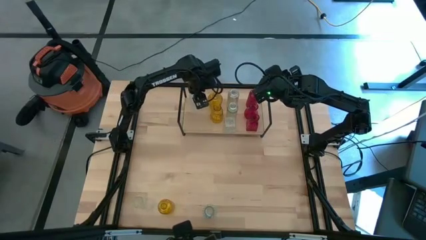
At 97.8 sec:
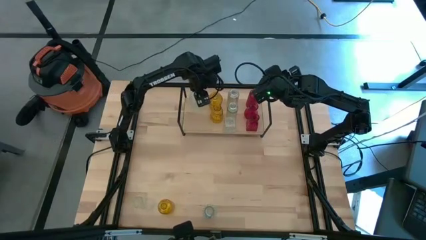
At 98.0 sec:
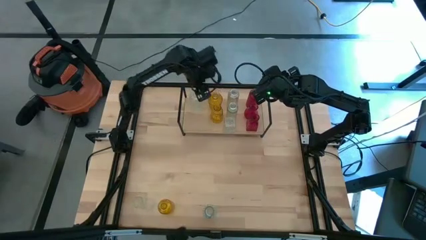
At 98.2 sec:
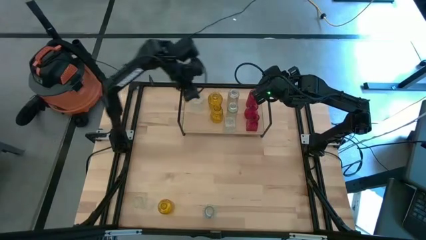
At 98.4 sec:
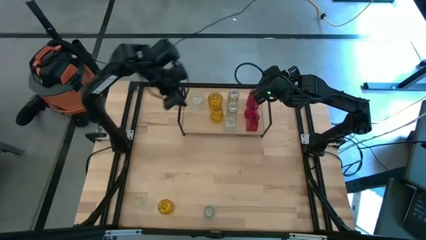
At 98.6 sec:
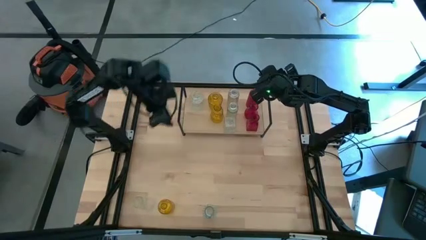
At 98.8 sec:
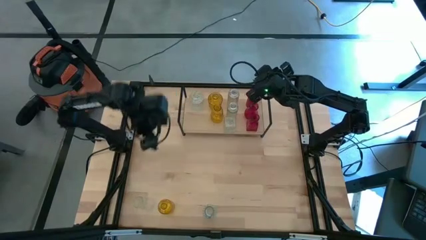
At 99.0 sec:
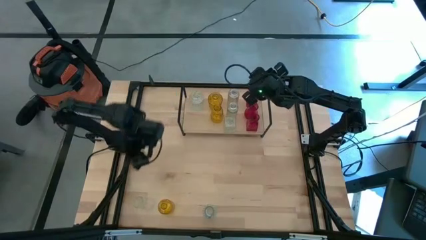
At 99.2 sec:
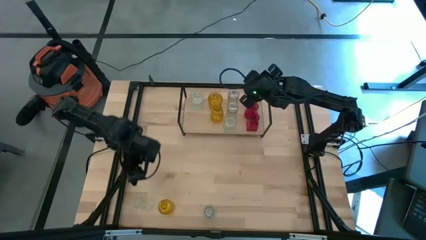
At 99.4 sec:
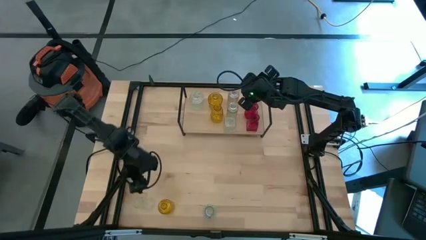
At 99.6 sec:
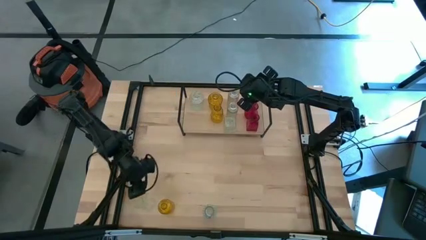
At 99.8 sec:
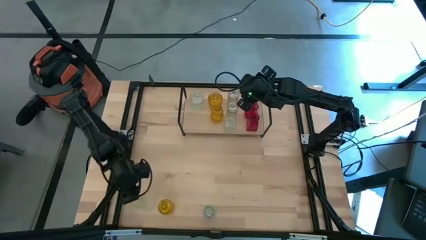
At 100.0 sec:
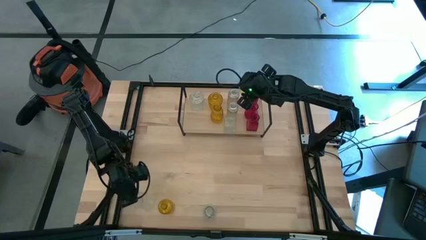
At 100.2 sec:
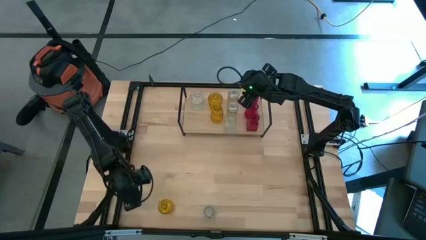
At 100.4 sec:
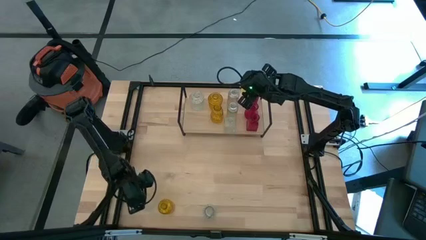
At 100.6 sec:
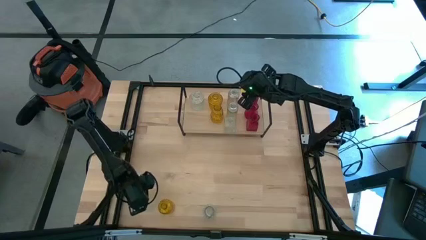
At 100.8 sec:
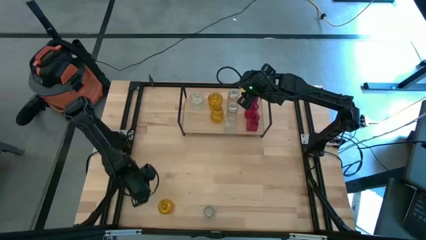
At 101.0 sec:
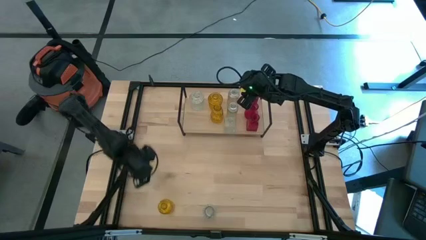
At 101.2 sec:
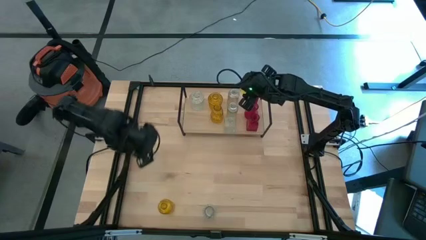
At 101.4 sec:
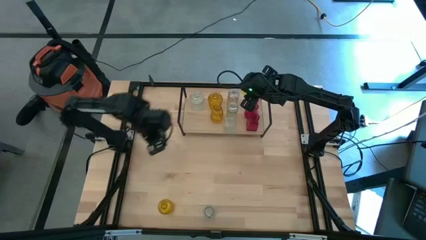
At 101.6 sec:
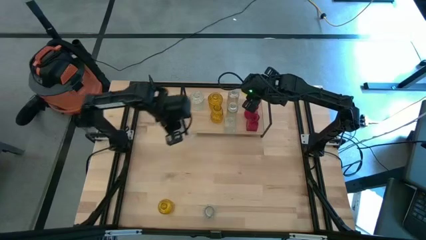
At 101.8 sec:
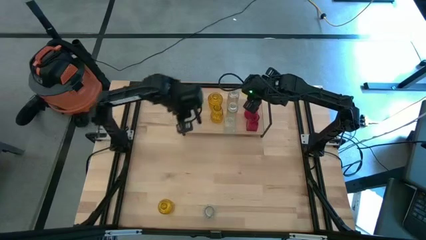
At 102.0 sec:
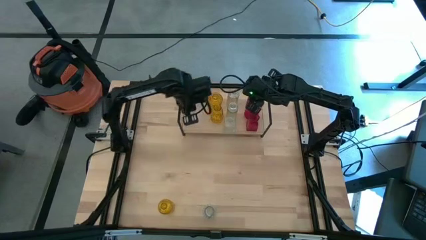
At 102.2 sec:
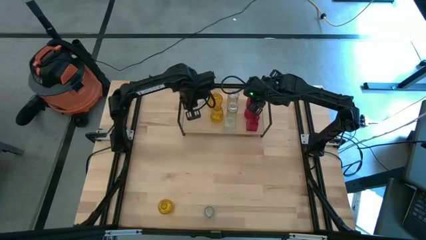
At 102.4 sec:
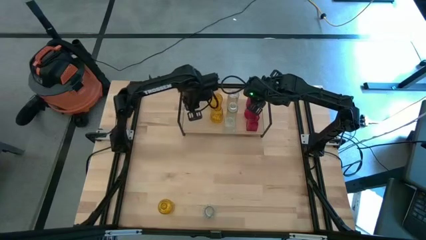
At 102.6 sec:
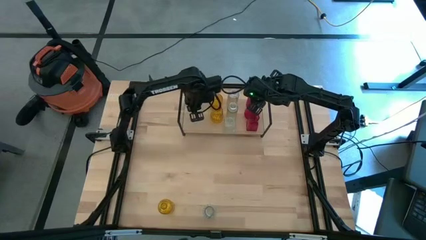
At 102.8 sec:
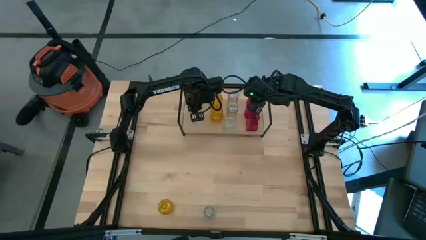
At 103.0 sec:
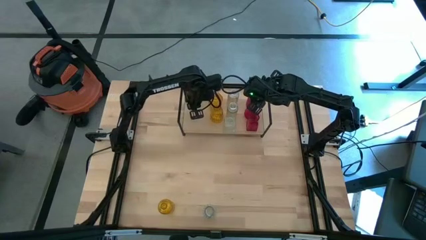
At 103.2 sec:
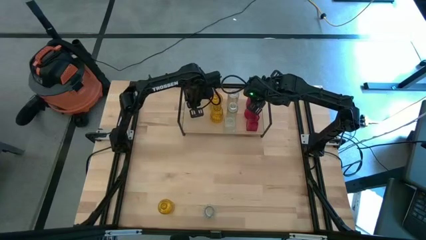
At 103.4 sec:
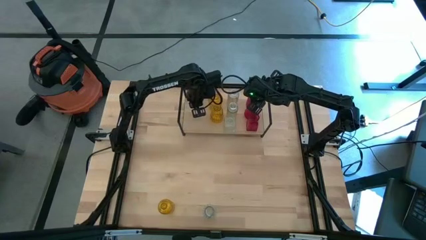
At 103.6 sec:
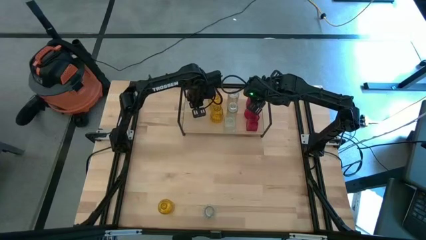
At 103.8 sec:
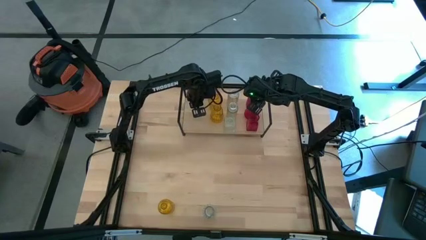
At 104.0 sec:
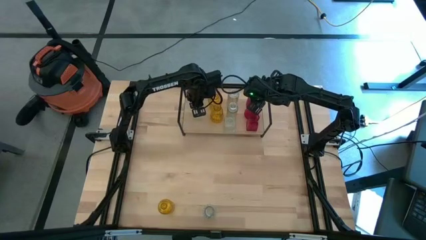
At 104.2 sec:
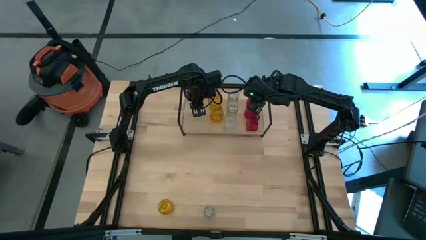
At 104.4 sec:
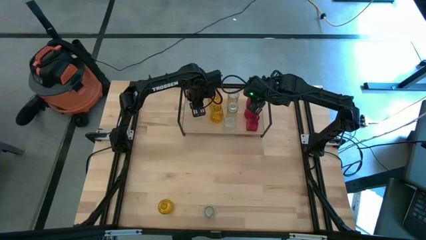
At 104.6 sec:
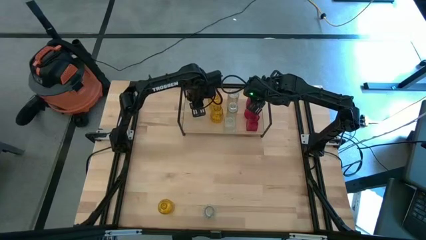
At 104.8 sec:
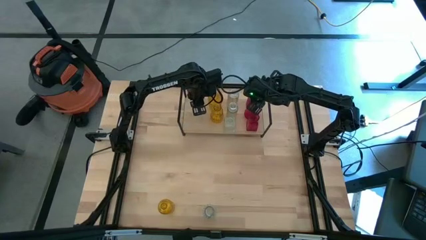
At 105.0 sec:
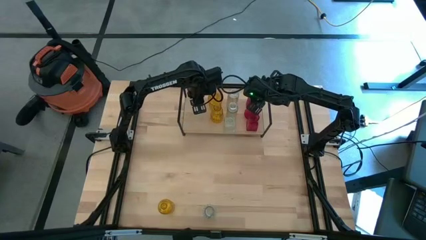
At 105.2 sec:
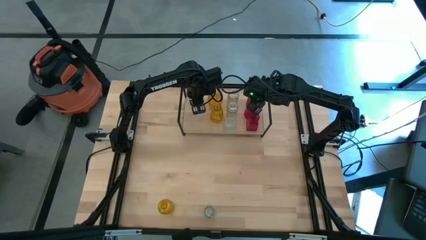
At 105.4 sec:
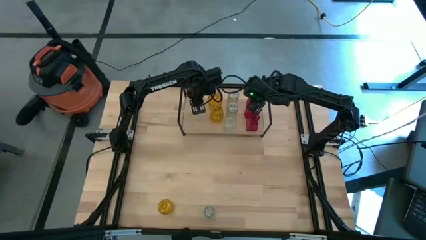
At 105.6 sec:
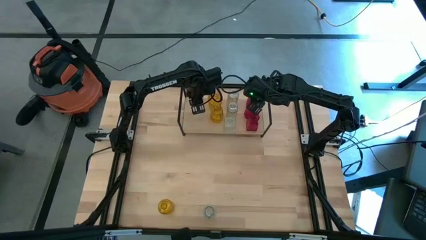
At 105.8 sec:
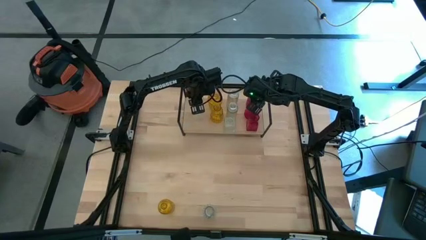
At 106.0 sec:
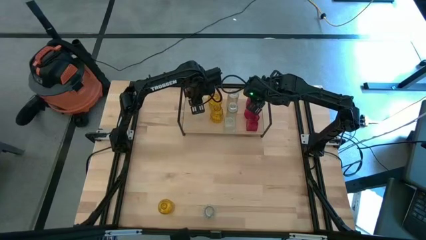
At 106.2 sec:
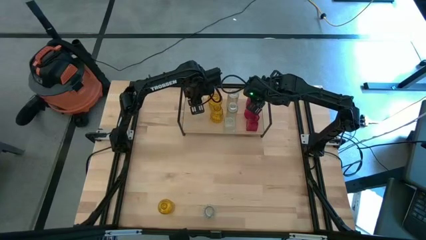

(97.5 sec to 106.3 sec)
Task: sort vases onto shelf
Put the transparent vase on the shelf aligned with the other transparent vase

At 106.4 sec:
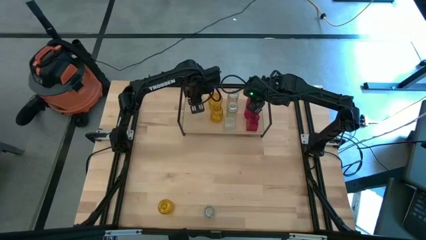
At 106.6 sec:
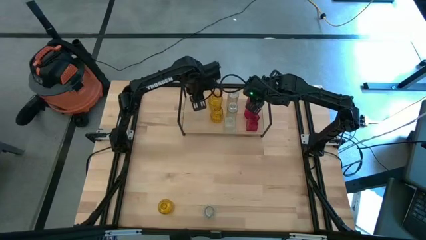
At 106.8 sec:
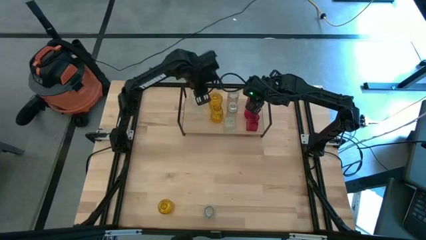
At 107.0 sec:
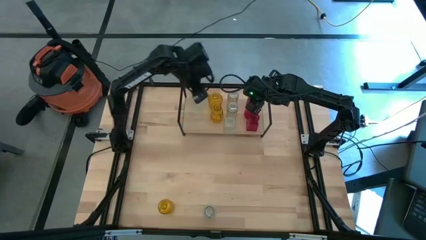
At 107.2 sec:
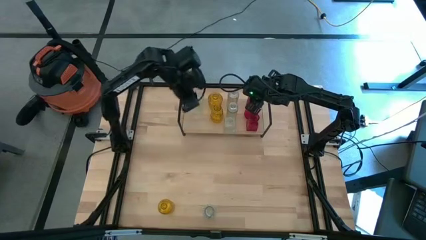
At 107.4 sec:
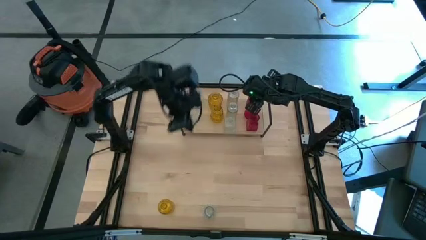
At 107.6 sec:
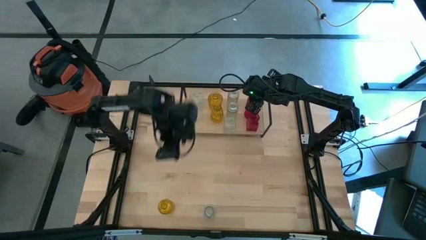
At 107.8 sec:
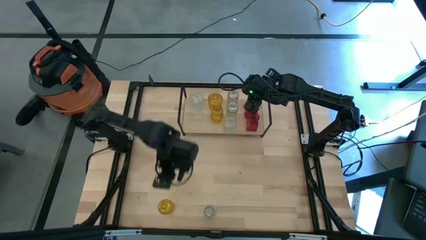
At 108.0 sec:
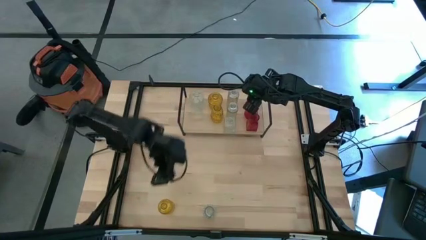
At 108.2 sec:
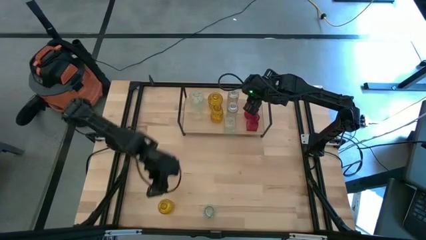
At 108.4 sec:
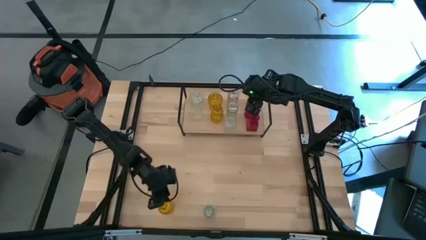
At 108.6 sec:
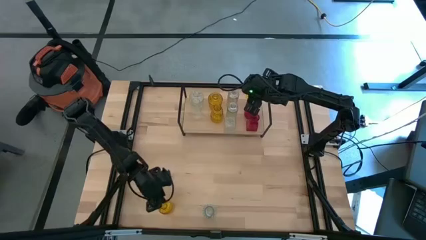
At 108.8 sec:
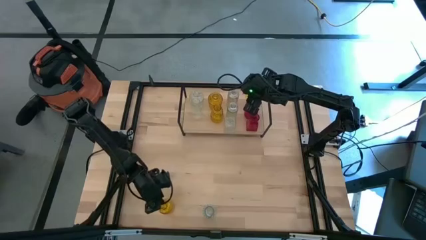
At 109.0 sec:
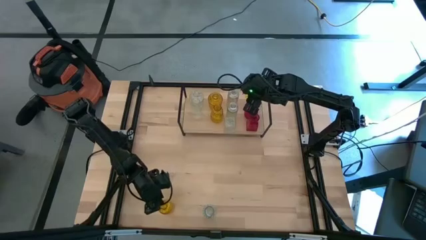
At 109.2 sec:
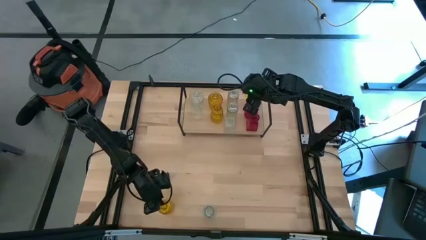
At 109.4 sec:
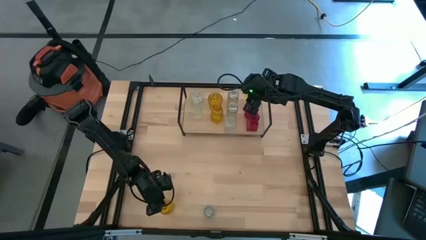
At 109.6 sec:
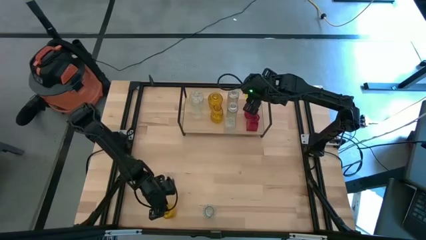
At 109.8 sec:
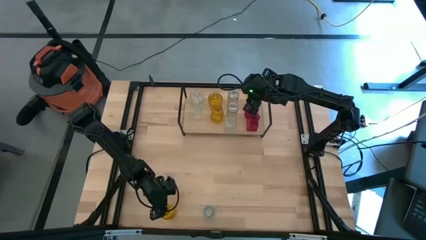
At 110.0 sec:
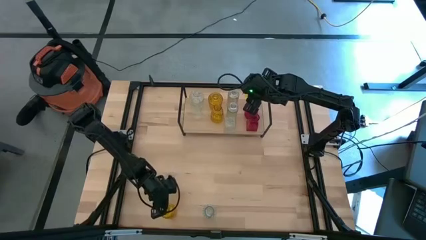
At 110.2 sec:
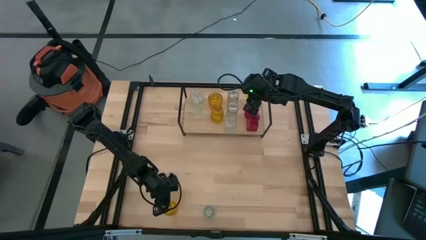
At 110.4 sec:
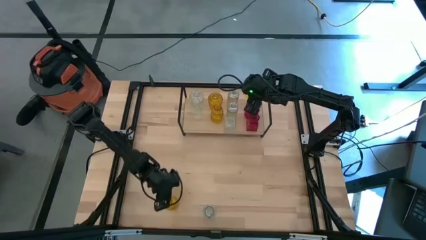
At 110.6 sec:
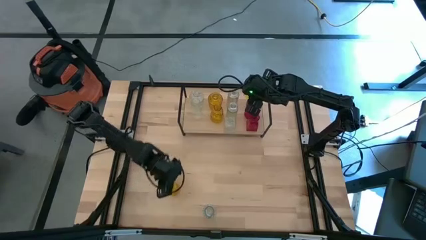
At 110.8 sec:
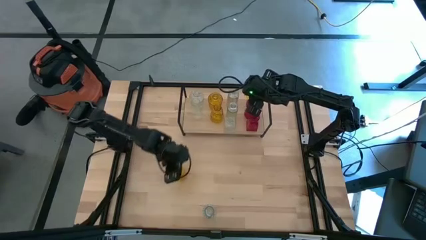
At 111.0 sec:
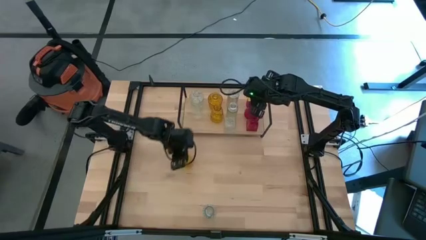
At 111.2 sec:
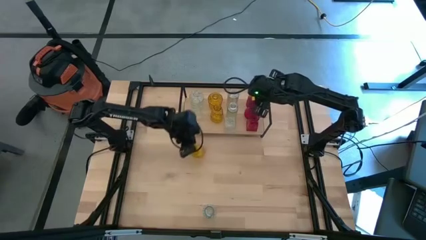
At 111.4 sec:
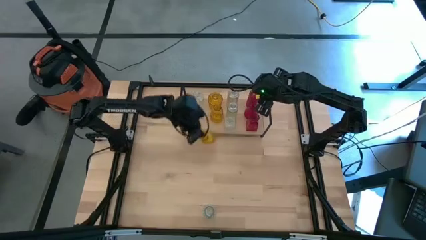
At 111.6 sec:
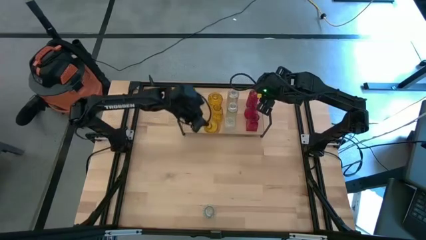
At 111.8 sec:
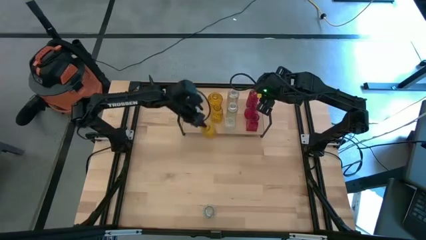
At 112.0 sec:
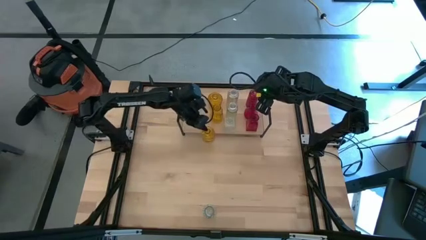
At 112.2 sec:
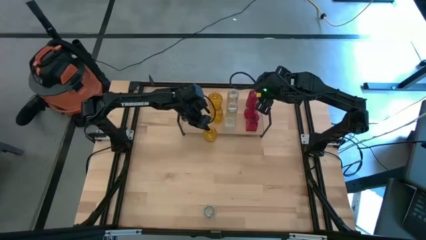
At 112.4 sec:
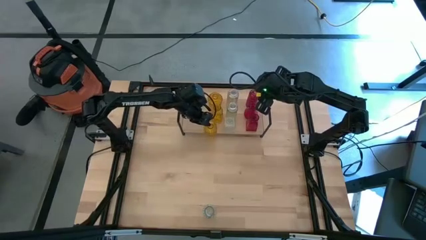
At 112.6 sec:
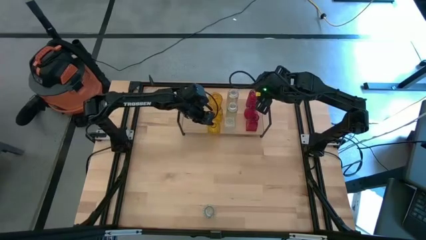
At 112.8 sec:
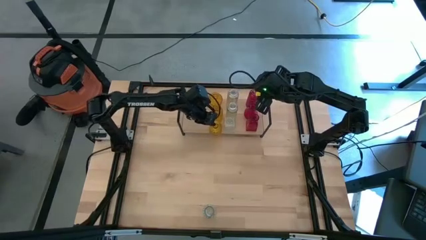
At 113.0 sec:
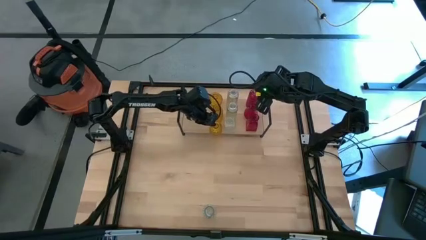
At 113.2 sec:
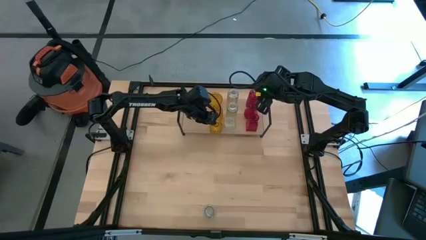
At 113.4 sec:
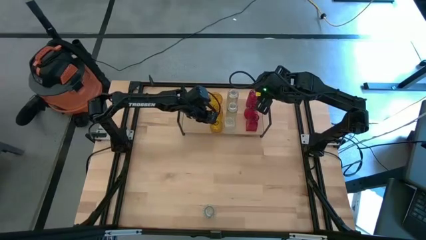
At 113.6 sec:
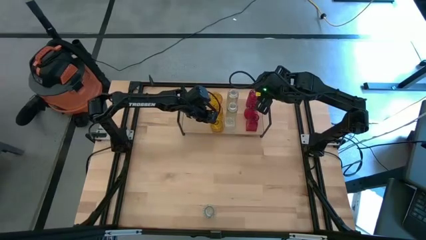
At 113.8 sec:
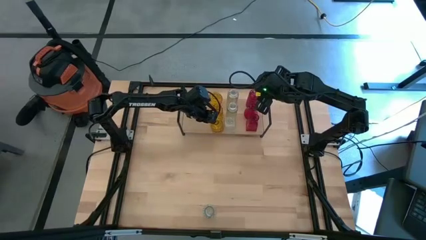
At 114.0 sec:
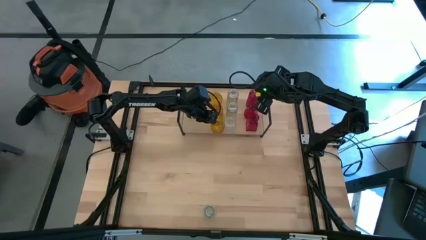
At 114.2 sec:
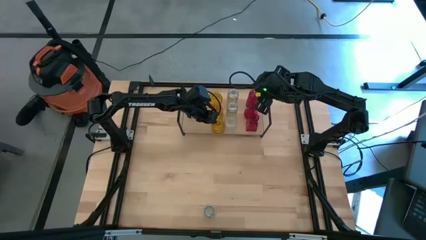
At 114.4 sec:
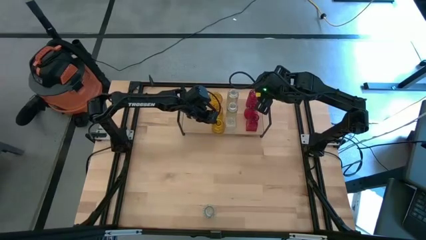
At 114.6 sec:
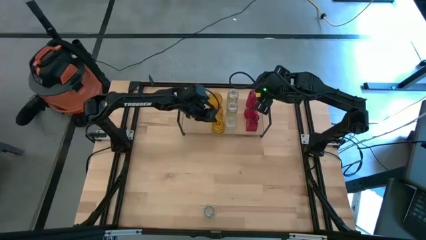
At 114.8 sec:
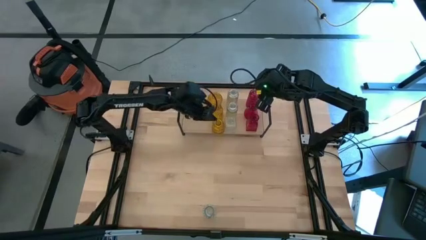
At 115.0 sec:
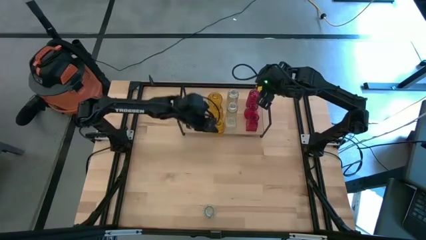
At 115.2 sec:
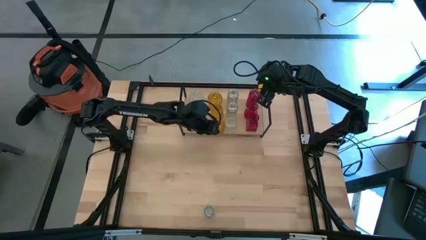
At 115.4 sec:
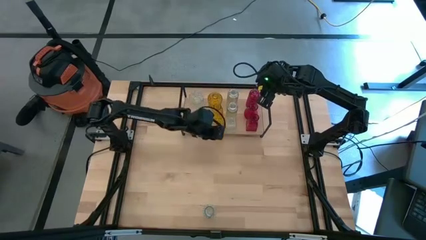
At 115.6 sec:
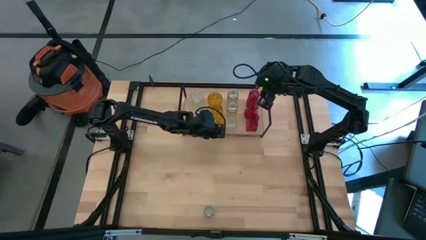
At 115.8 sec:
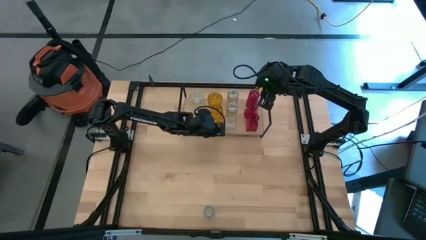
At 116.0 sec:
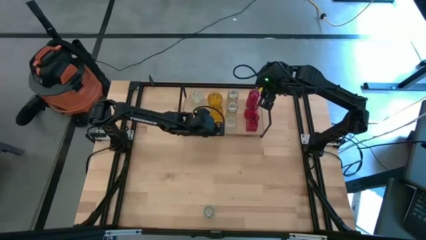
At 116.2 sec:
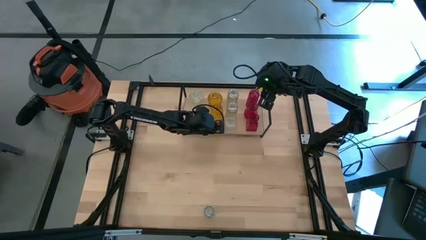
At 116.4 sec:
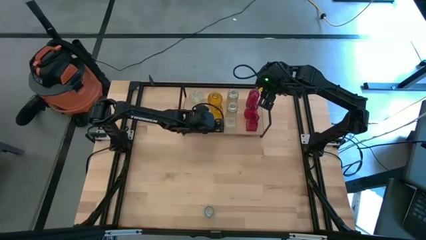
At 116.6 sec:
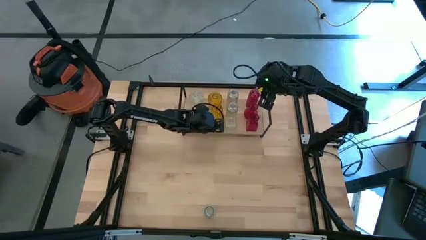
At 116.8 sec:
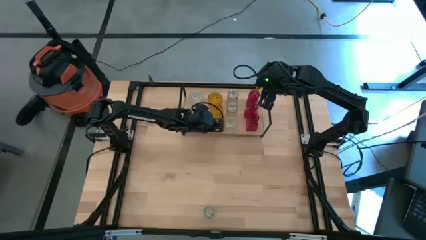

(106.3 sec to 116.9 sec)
Put the yellow vase on the shelf aligned with the other yellow vases
